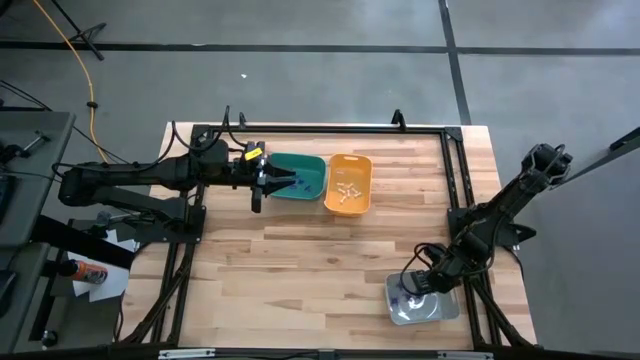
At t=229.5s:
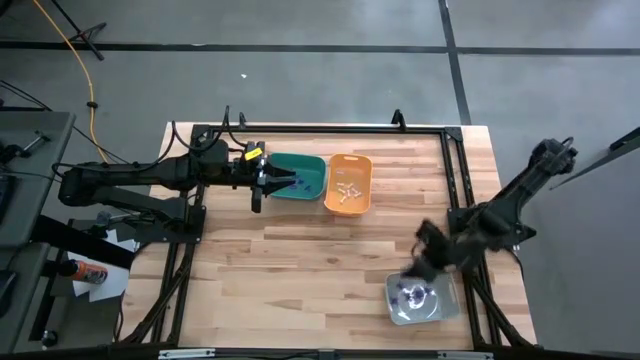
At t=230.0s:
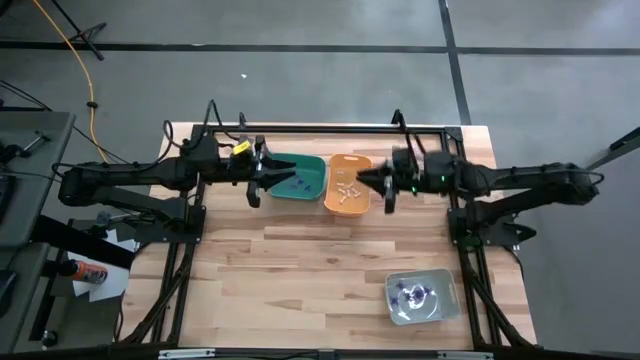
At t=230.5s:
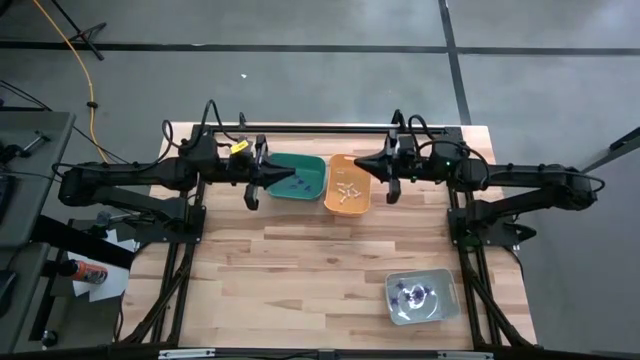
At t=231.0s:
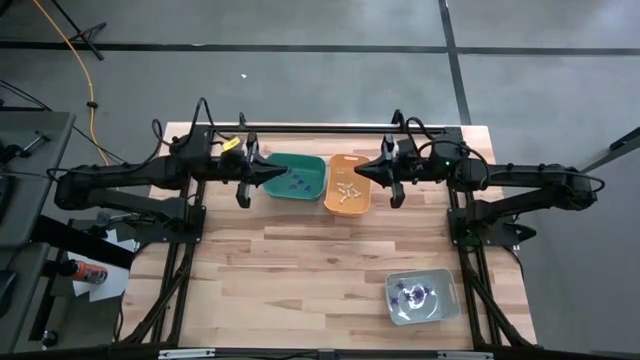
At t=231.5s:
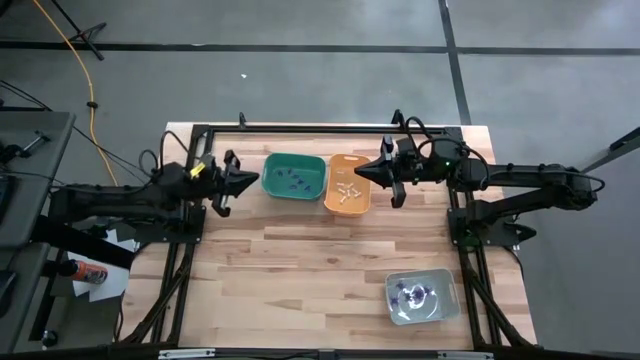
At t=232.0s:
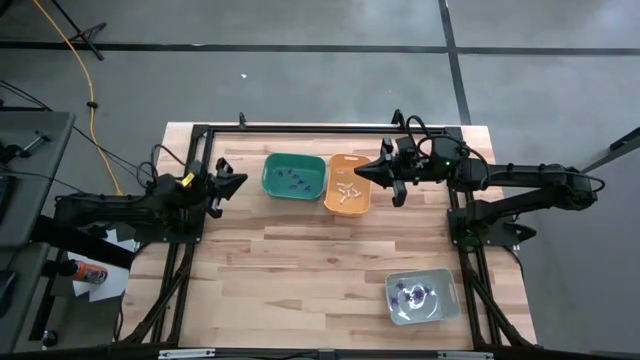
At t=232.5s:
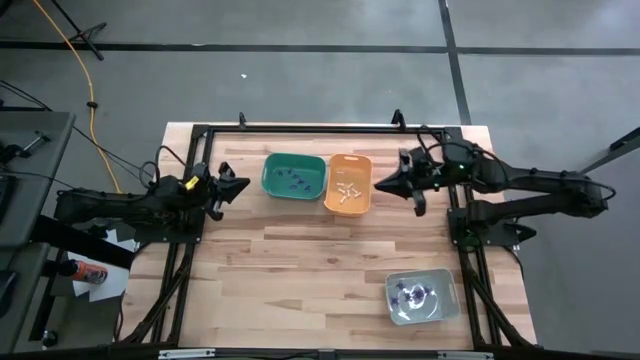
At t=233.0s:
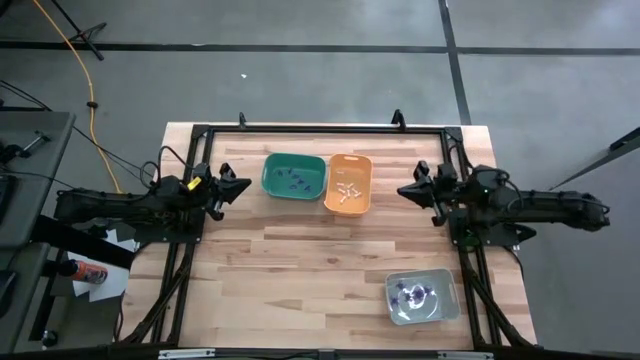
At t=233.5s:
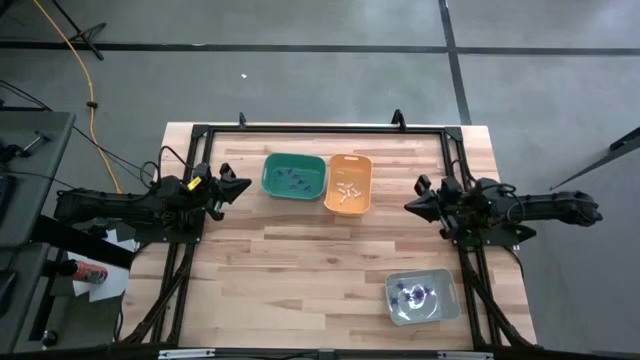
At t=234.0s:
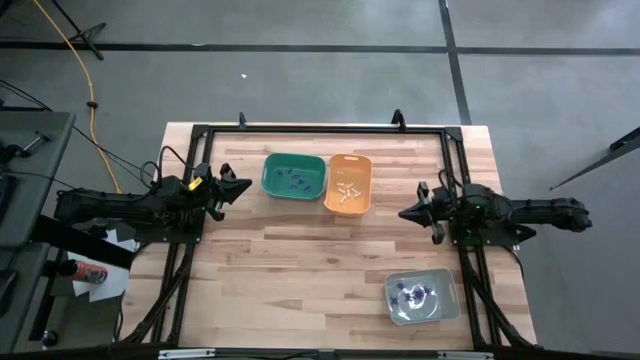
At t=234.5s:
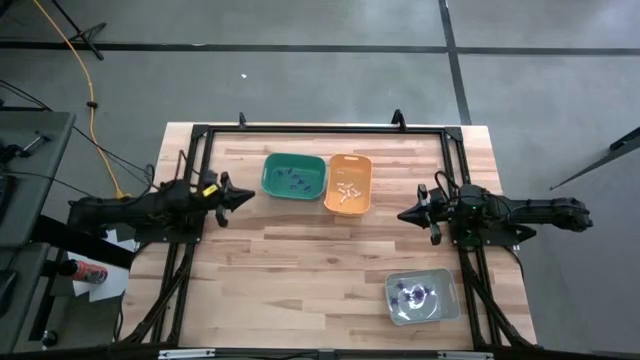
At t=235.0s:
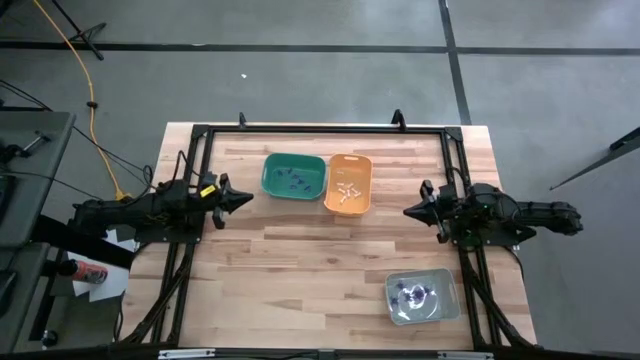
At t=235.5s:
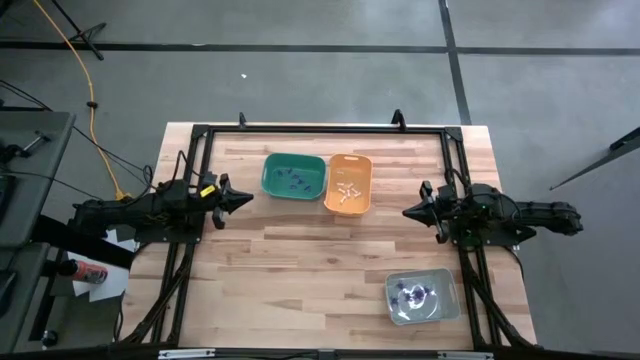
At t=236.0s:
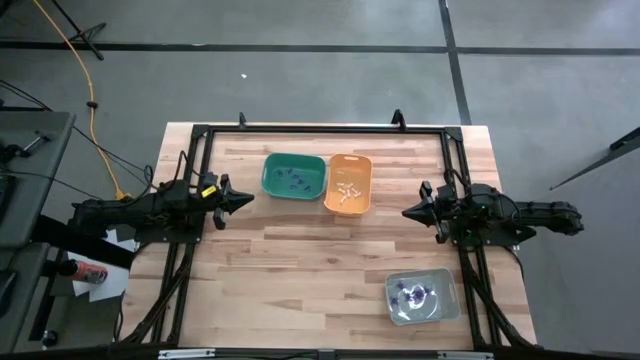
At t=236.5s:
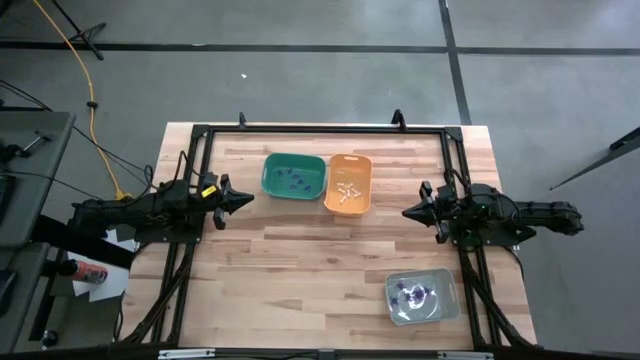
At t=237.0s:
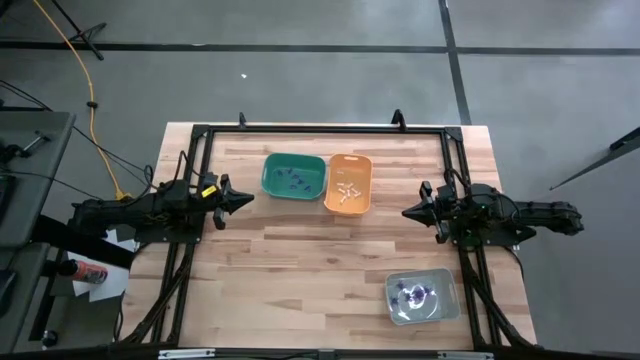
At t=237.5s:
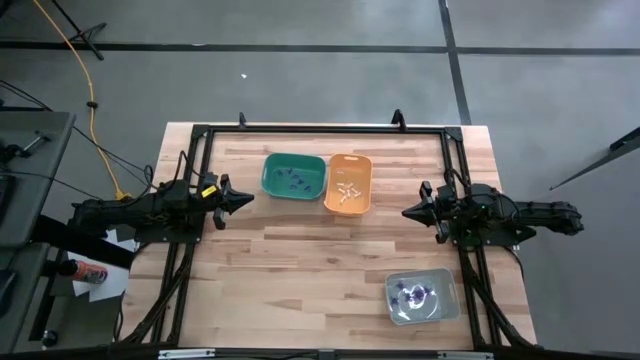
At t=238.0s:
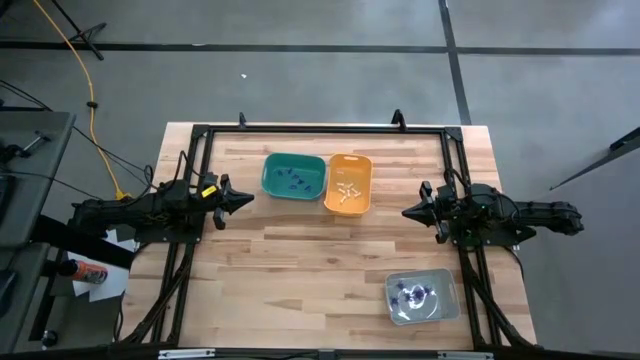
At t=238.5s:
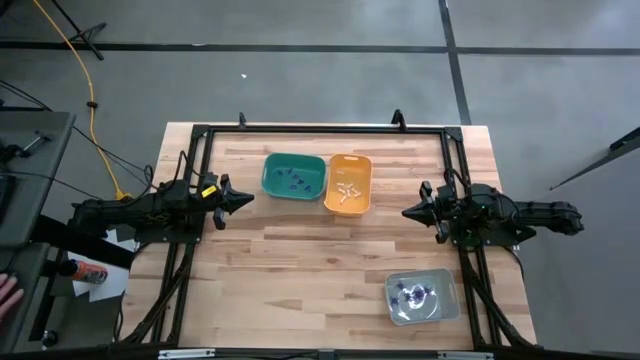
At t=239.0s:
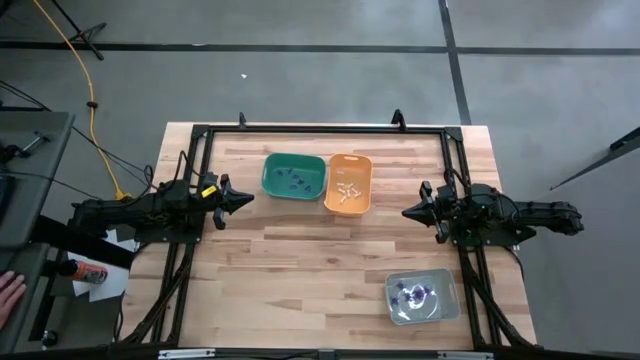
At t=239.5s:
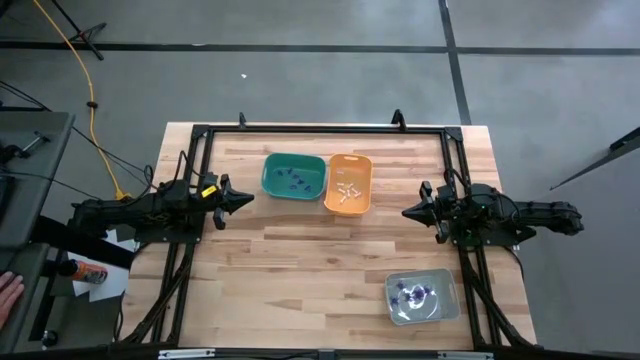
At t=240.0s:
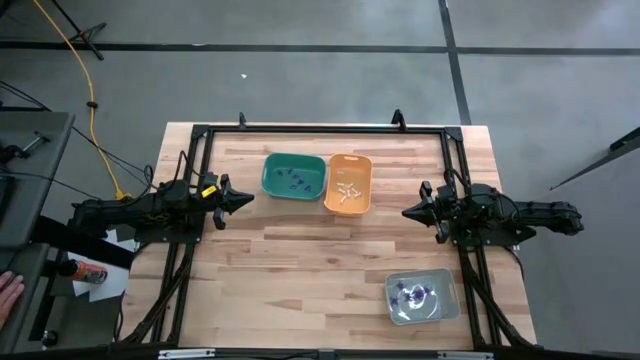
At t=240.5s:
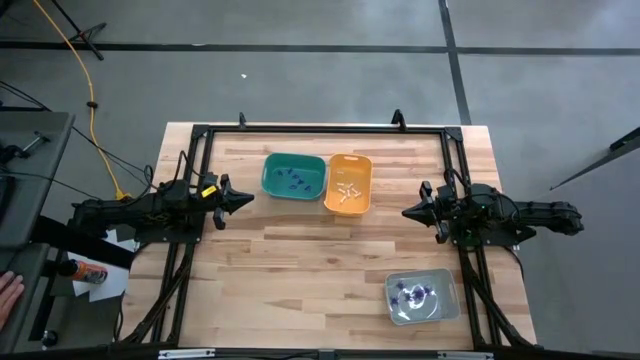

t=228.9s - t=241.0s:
Task: Sort Halloween decoration
Return to Home Position

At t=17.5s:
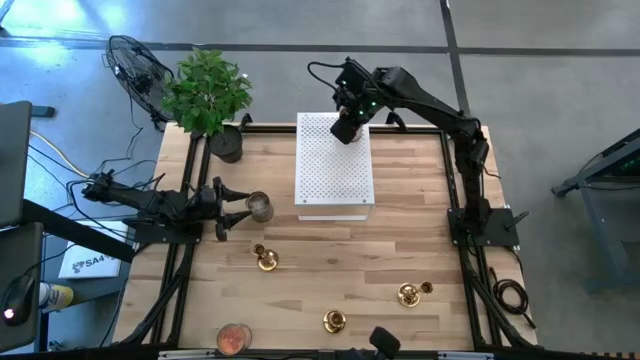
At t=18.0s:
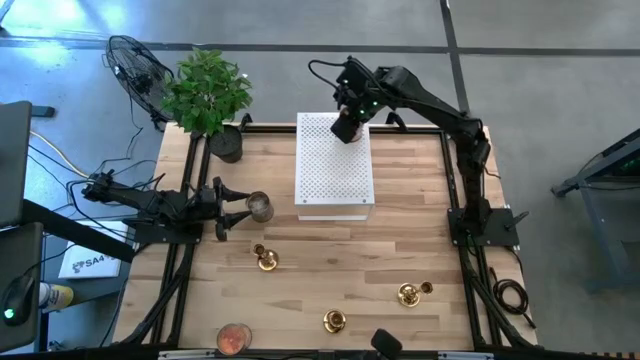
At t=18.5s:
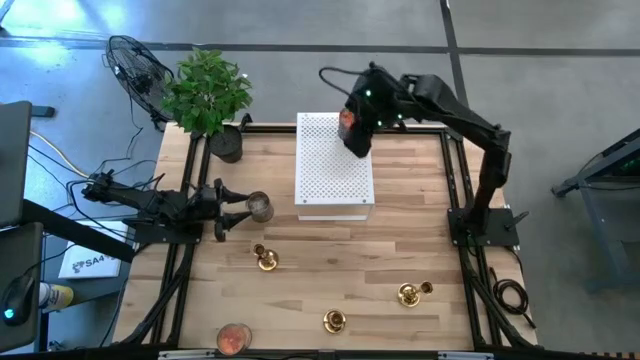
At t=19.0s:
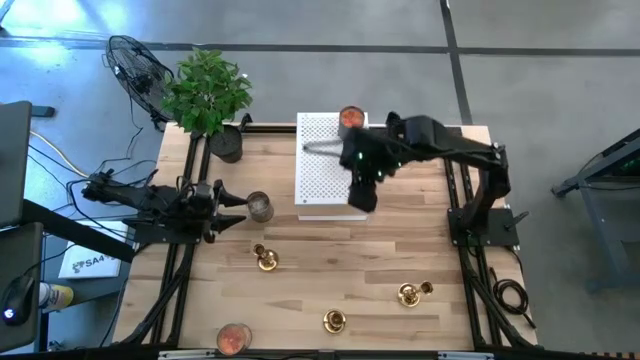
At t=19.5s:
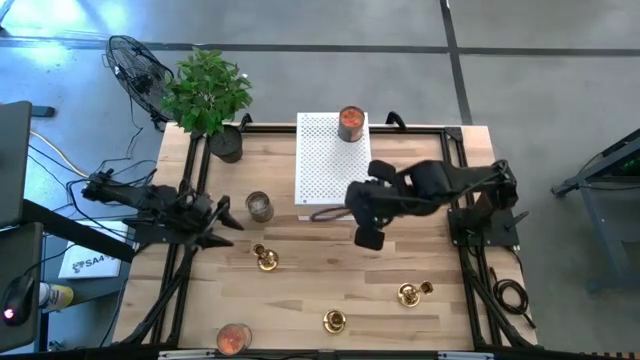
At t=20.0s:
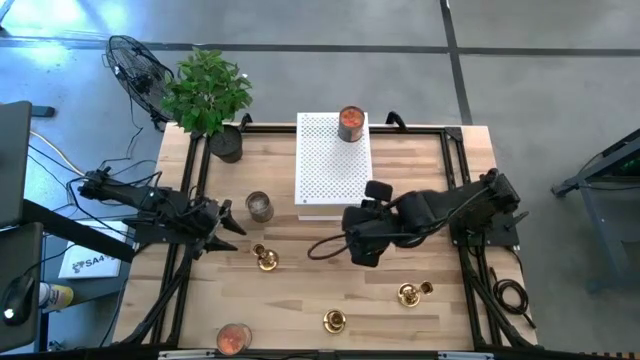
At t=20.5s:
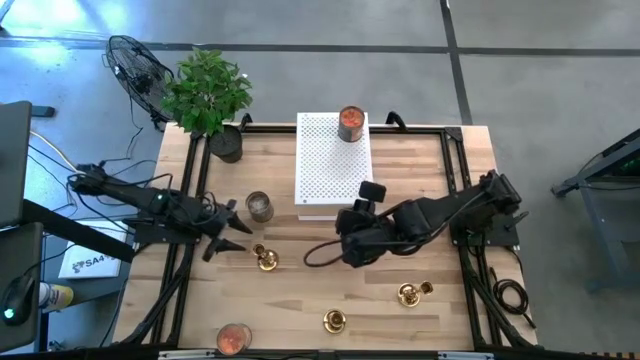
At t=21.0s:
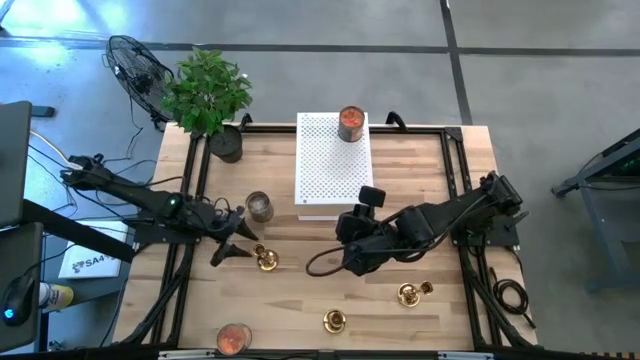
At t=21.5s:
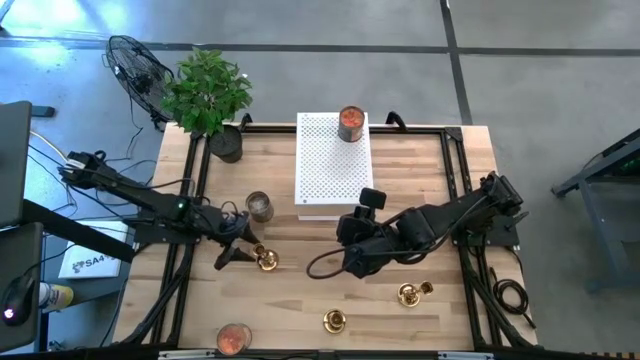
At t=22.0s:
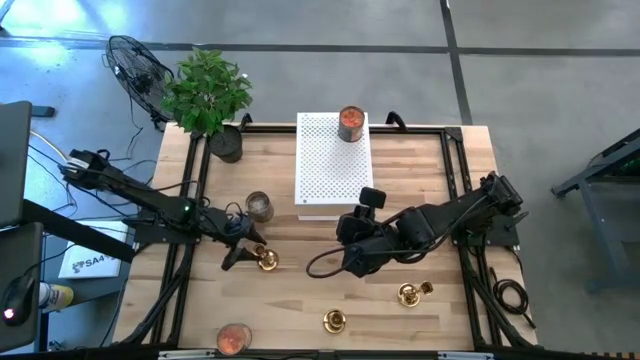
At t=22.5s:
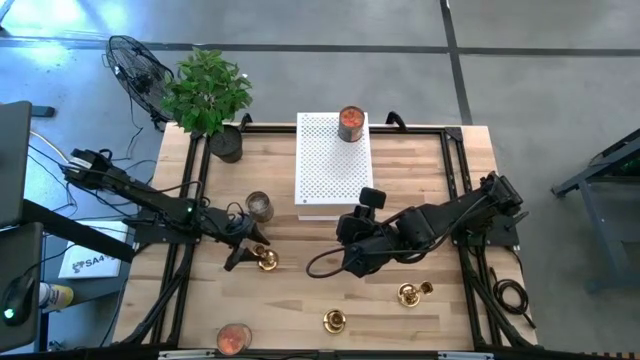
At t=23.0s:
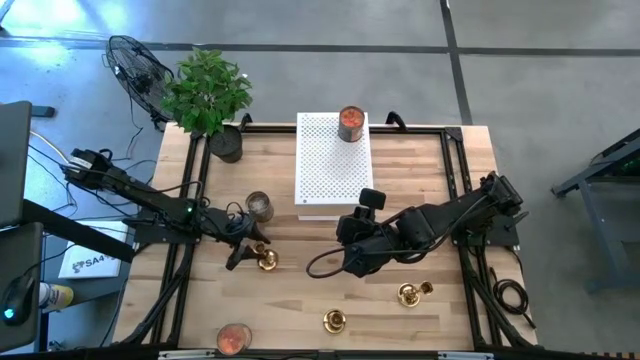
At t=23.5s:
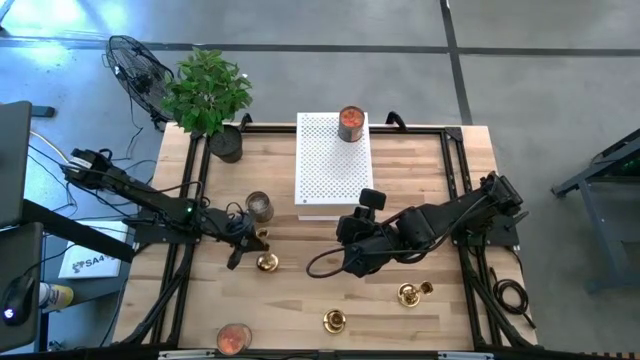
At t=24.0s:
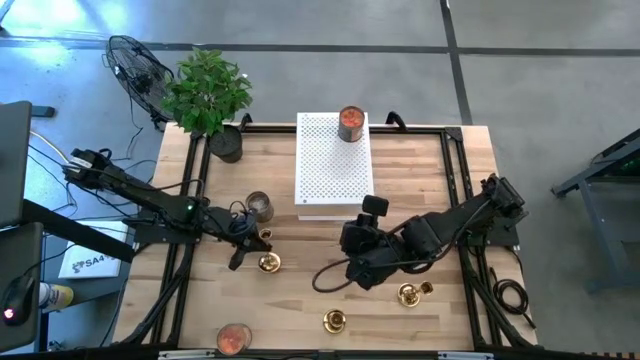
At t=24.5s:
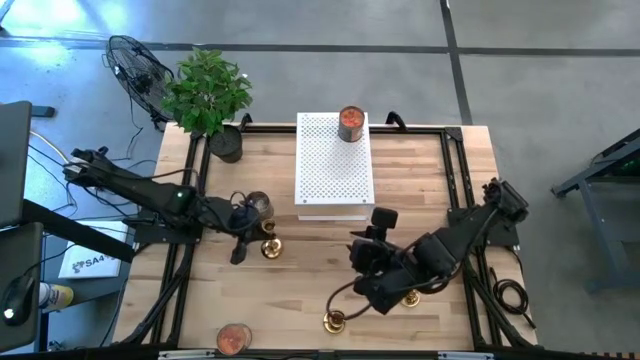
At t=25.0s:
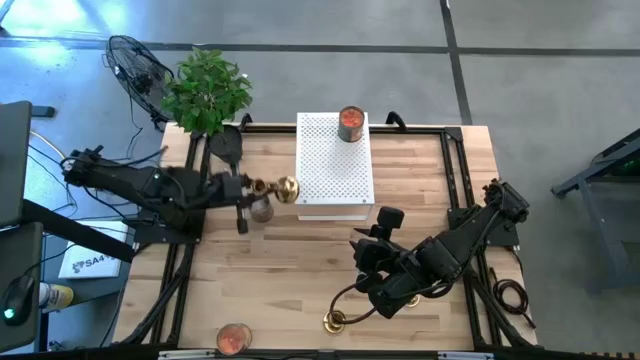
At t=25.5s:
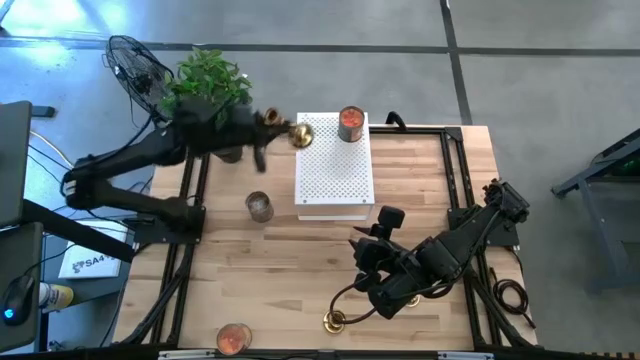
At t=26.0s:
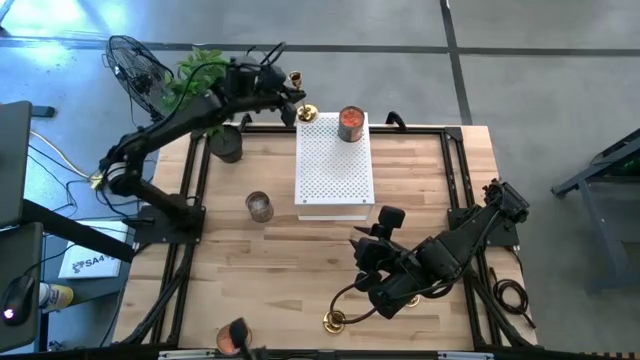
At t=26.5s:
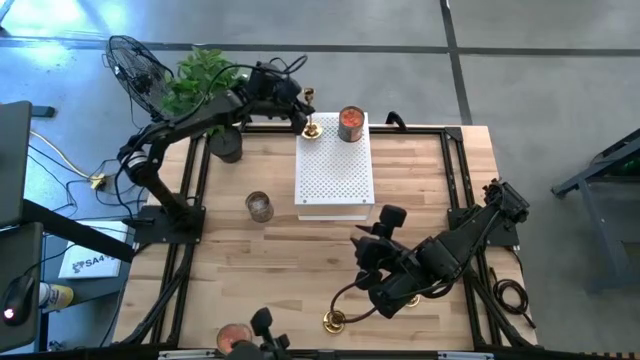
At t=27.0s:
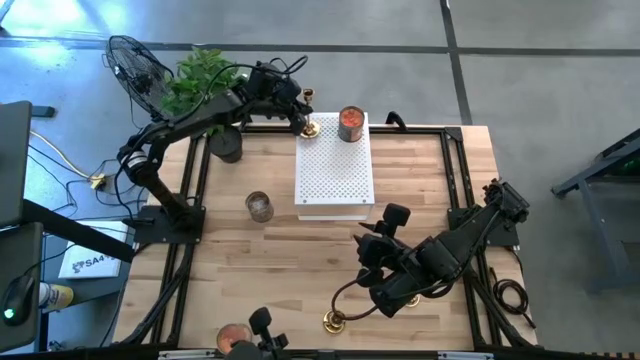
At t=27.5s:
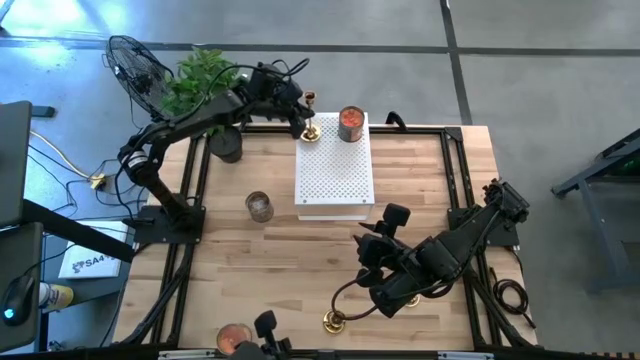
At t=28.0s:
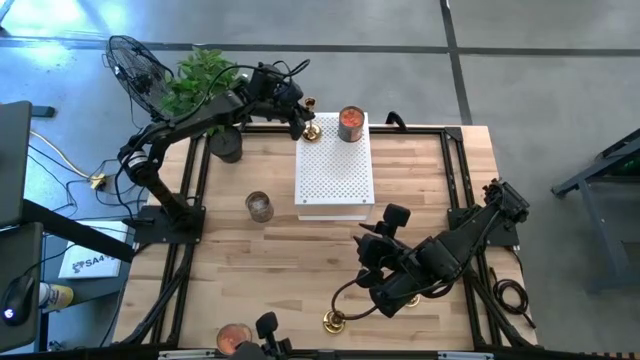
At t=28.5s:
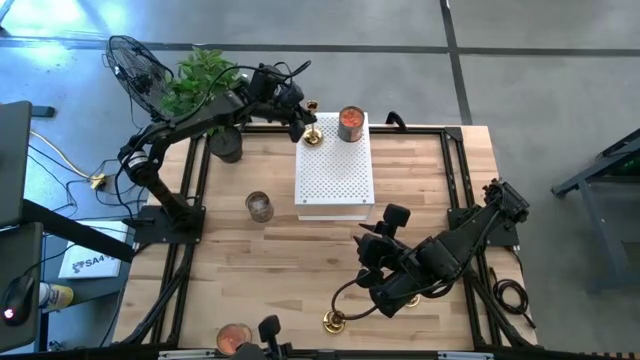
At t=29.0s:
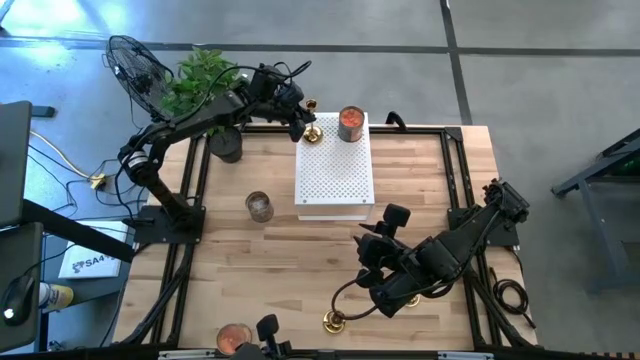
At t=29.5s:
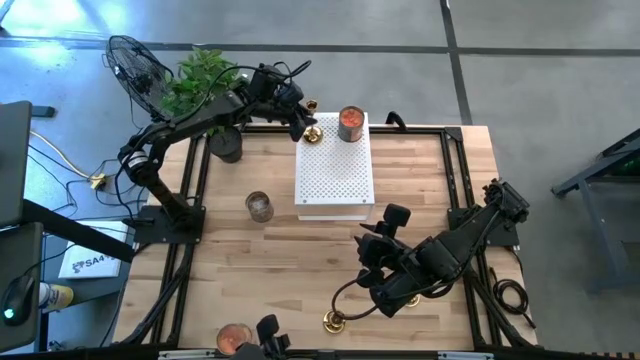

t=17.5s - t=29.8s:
Task: Pick & Place candle stick holders
Put the top gold candle holder on the shelf
